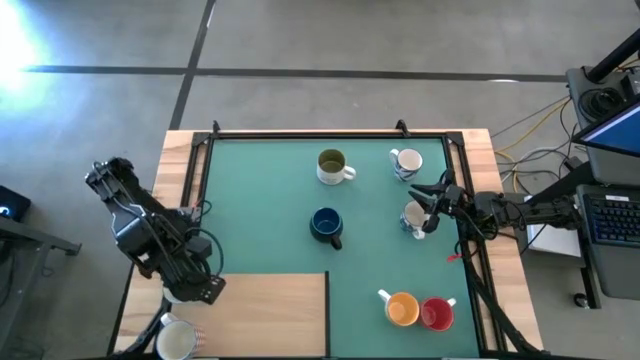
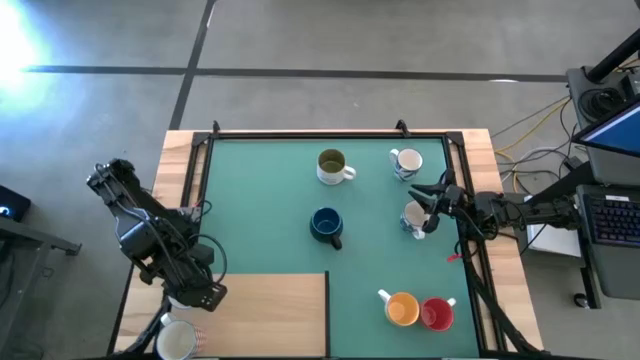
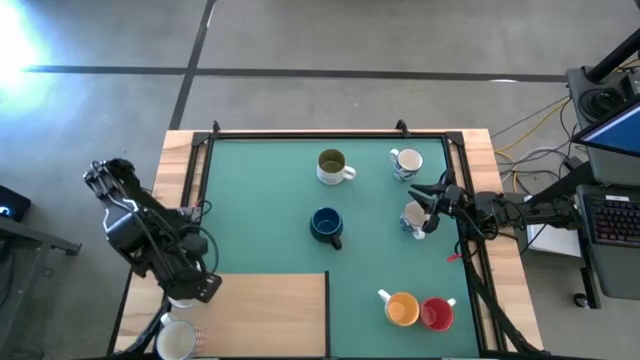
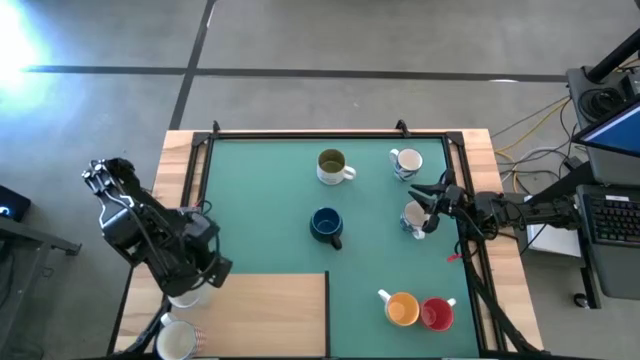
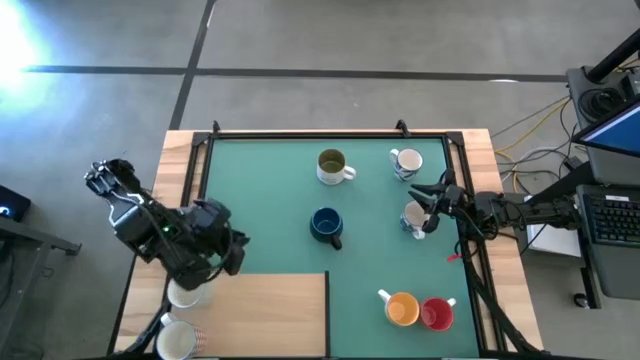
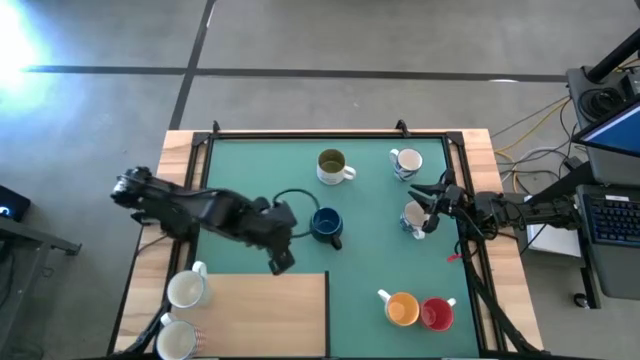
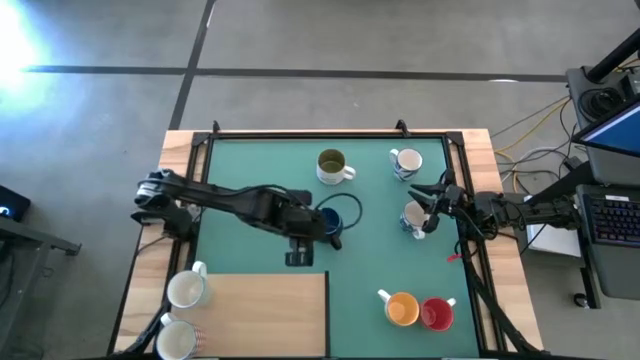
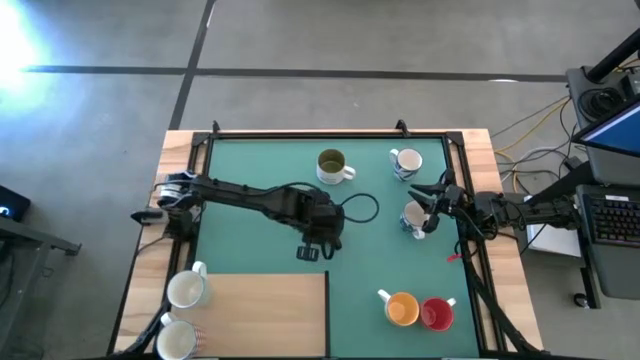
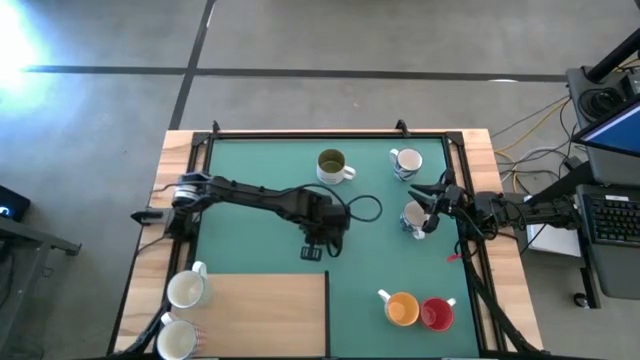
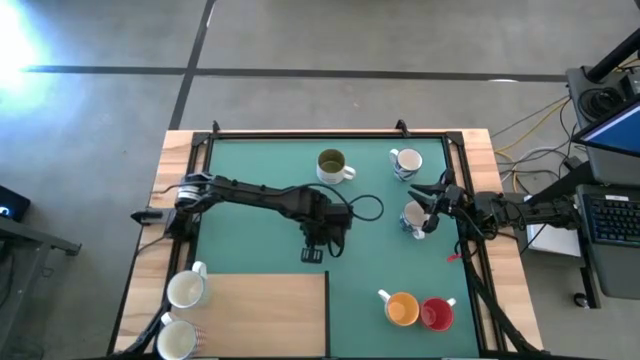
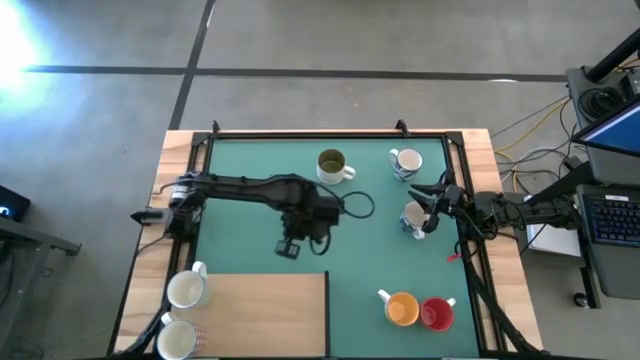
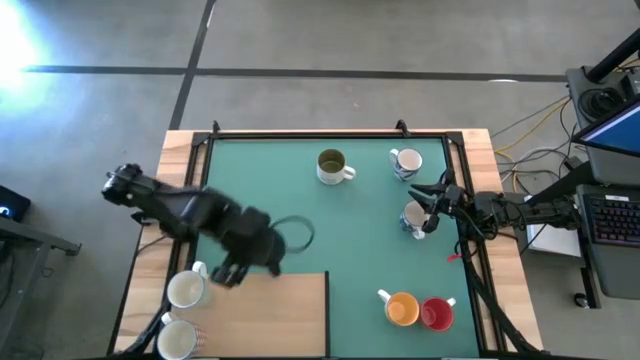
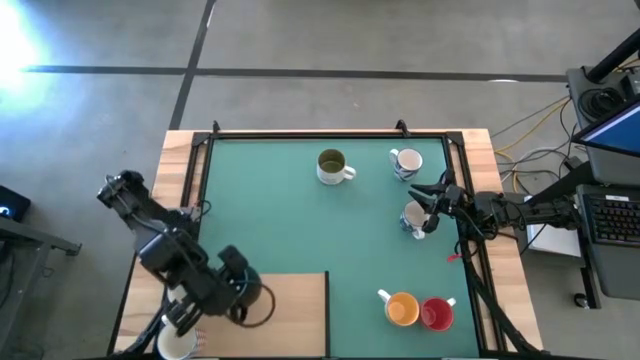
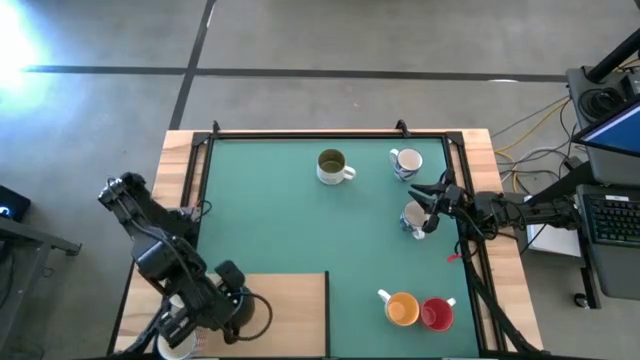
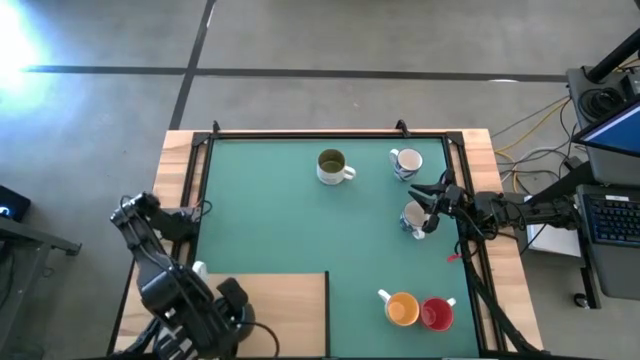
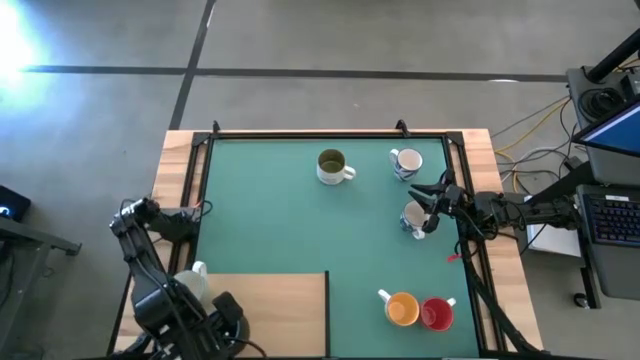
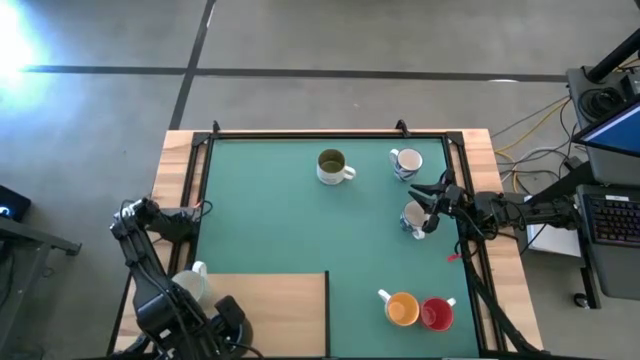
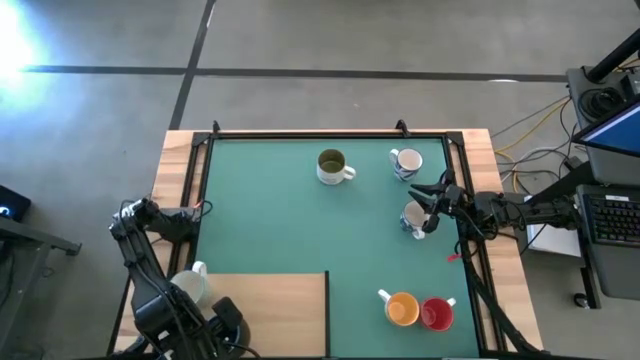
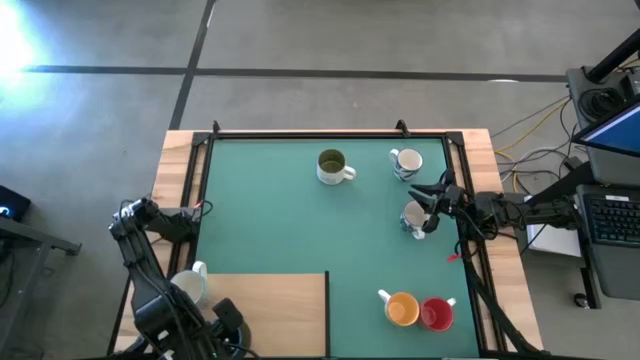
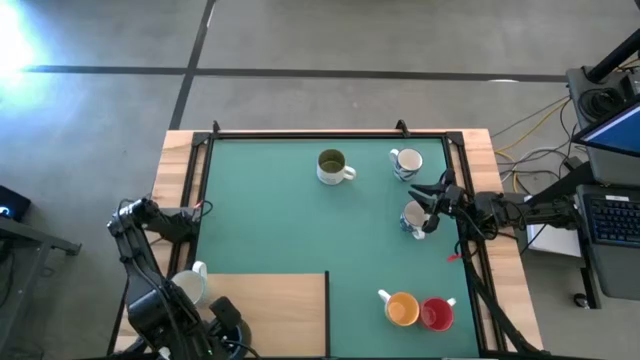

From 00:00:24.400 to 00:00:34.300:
Task: Place coffee mugs
Put the black mug on the shelf

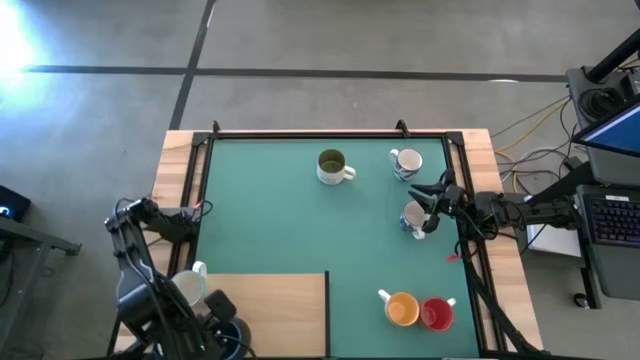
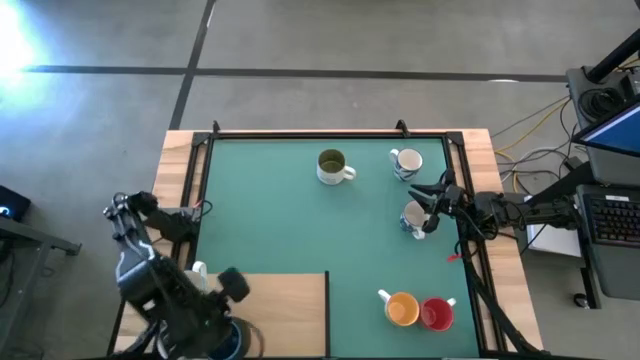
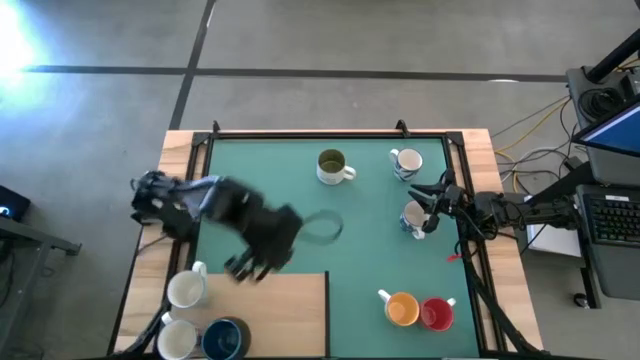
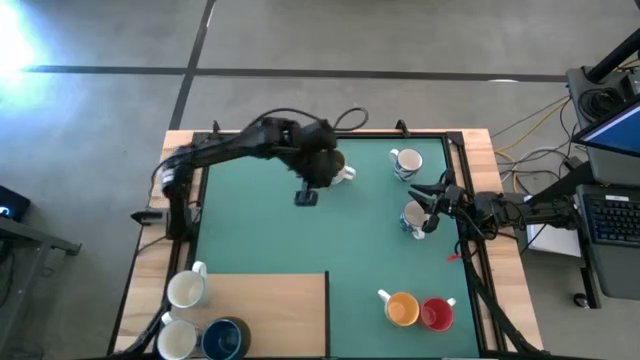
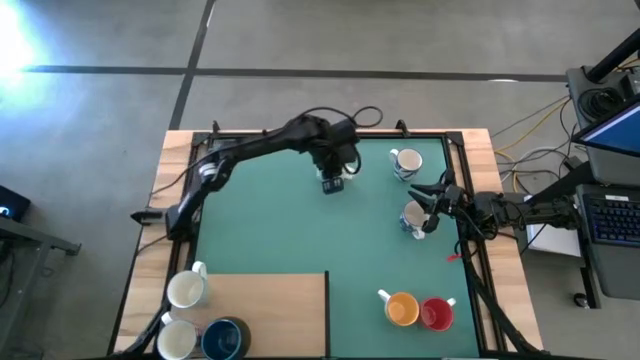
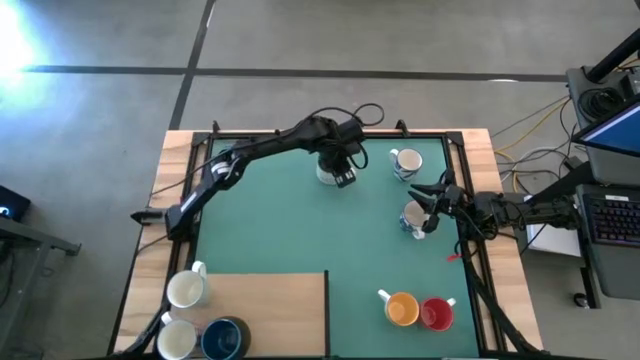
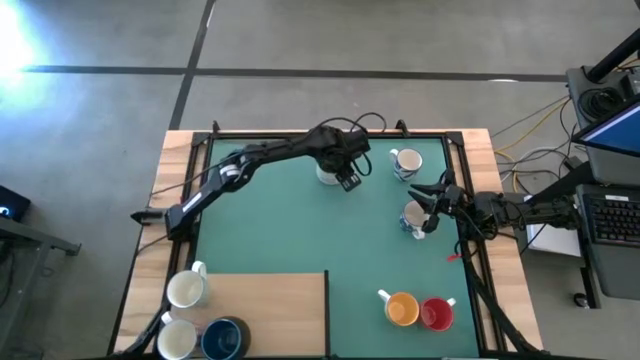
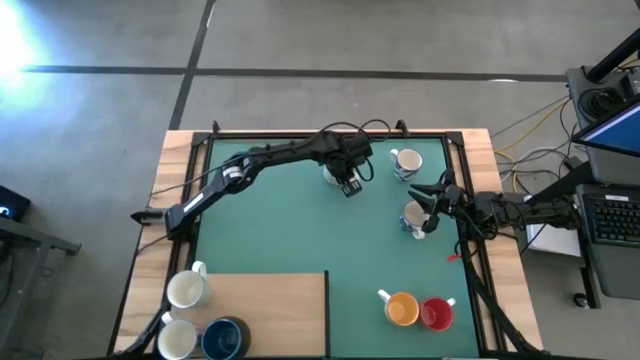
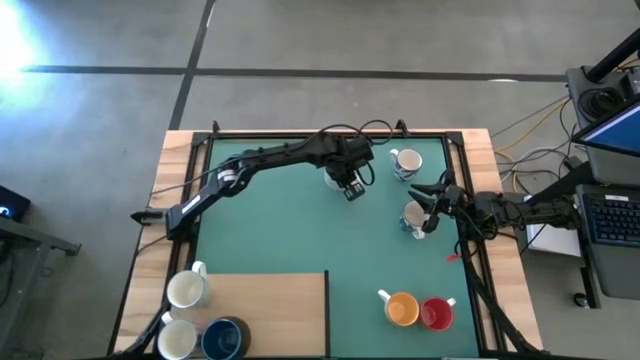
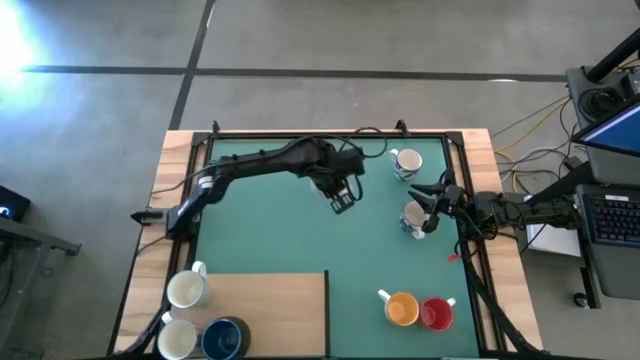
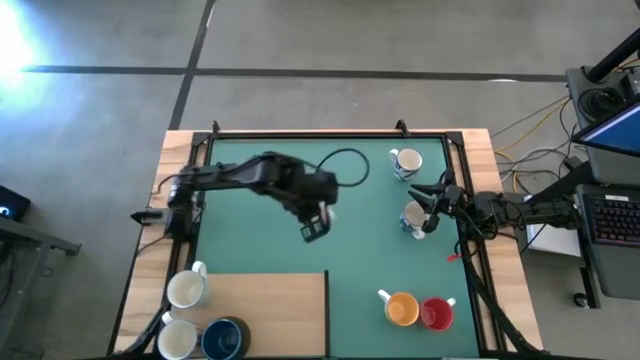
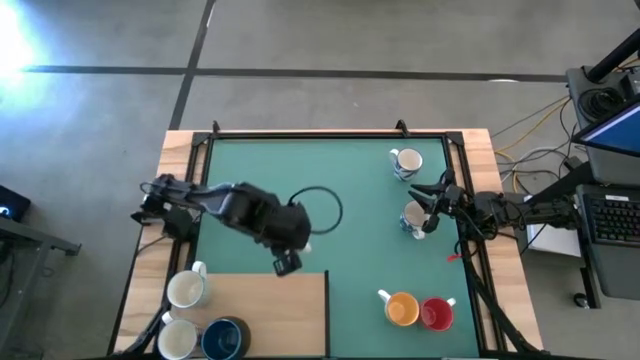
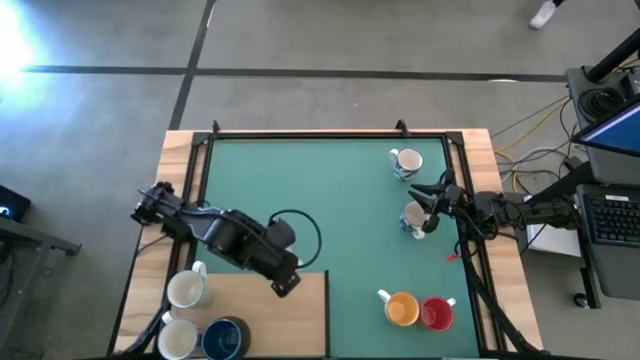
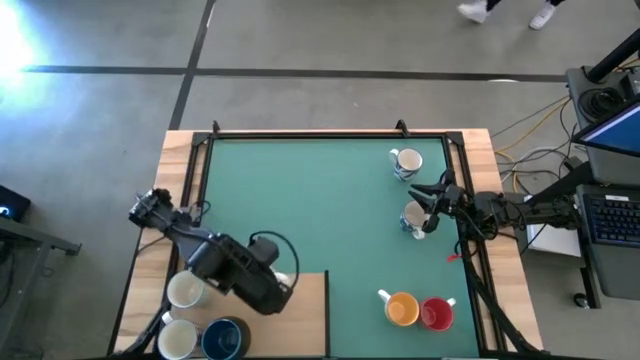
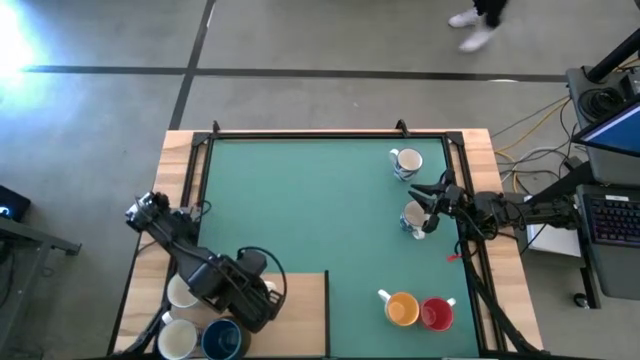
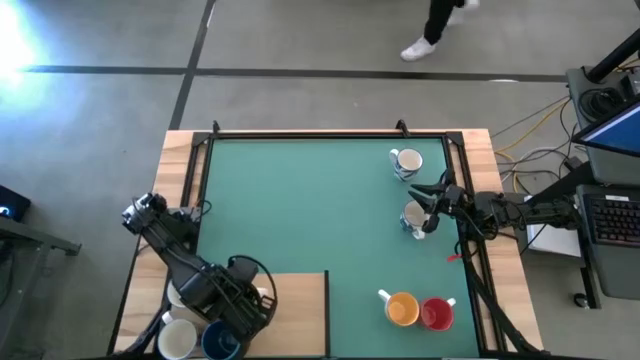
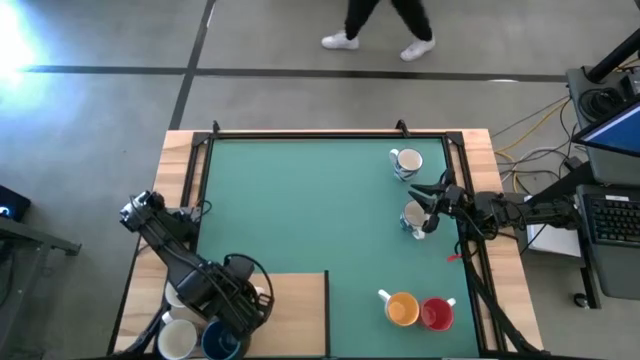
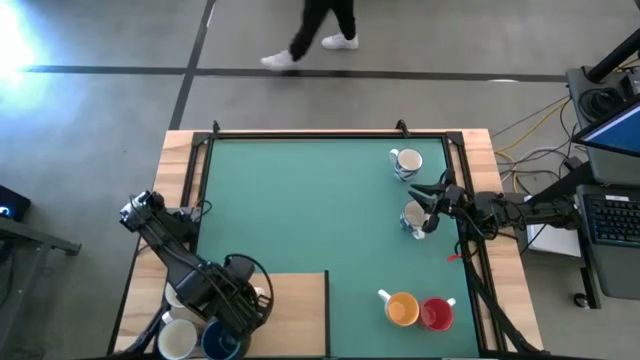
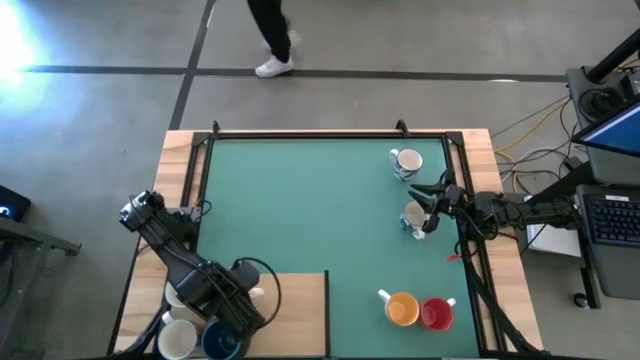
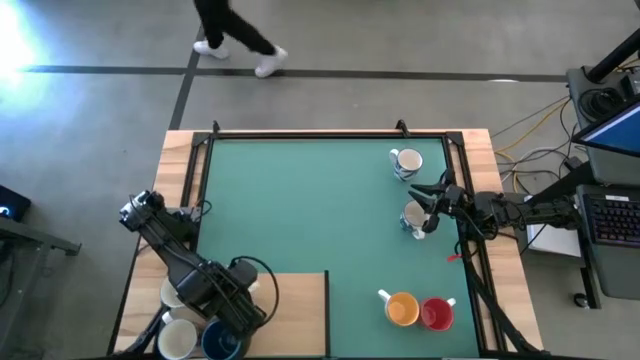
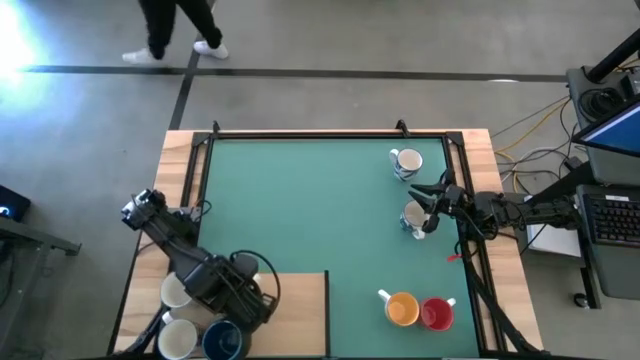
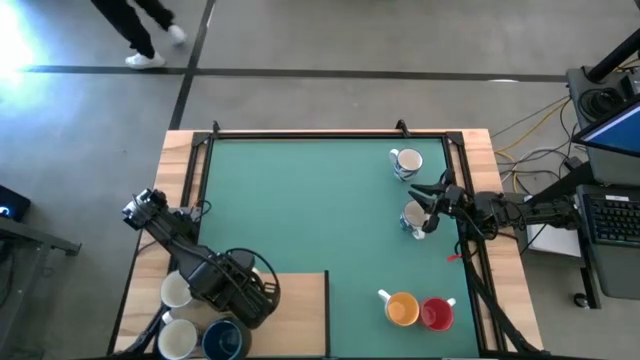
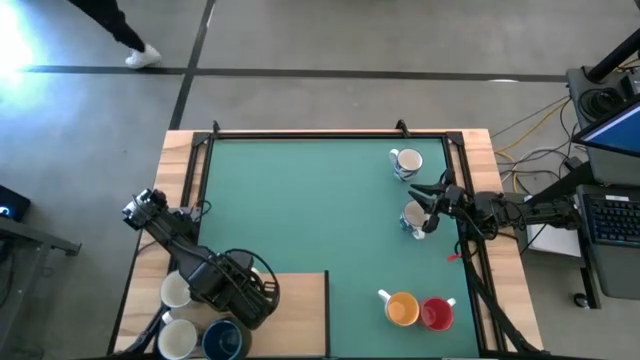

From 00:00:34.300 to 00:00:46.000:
Put the white mug on the shelf
